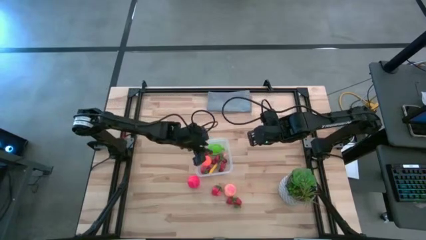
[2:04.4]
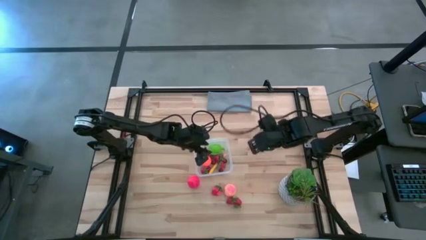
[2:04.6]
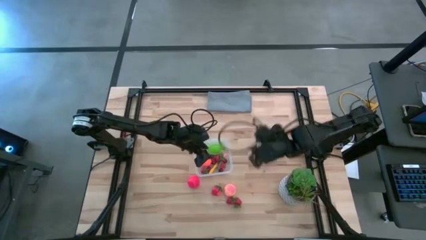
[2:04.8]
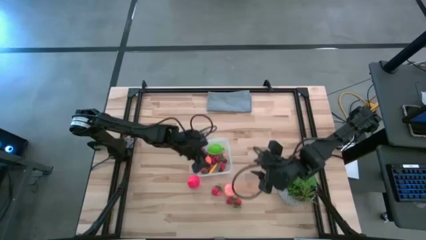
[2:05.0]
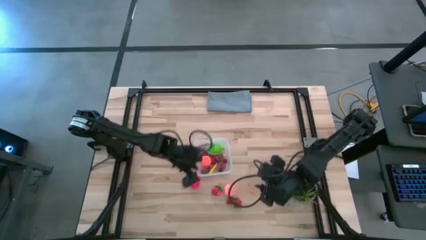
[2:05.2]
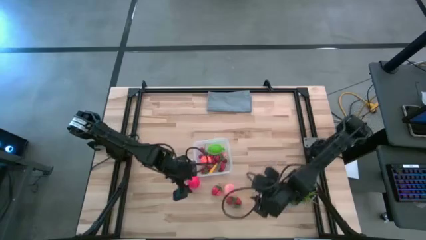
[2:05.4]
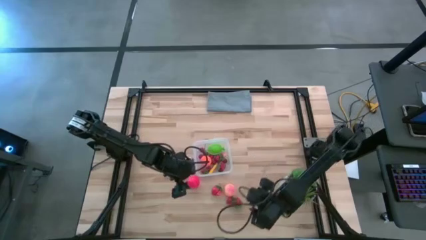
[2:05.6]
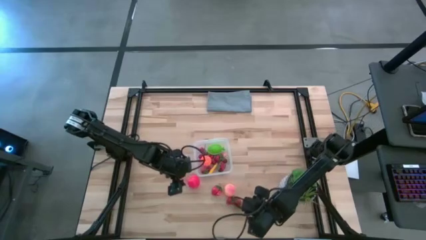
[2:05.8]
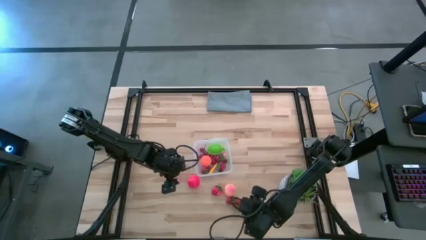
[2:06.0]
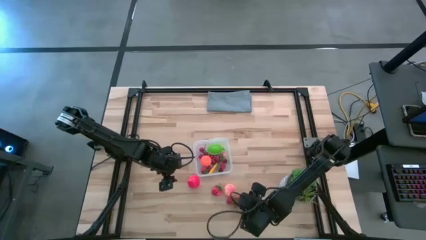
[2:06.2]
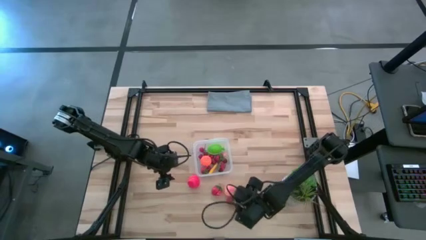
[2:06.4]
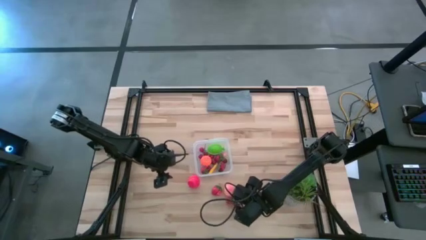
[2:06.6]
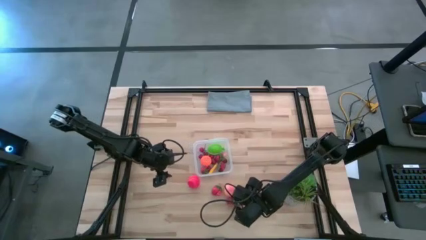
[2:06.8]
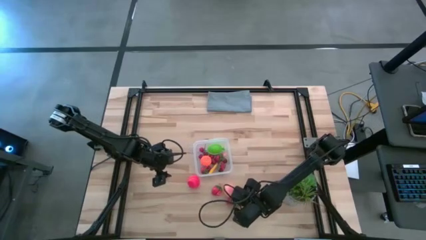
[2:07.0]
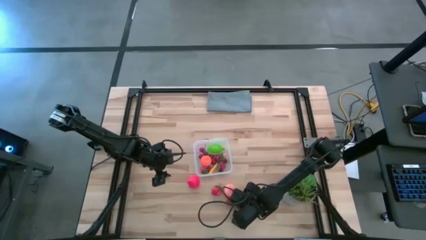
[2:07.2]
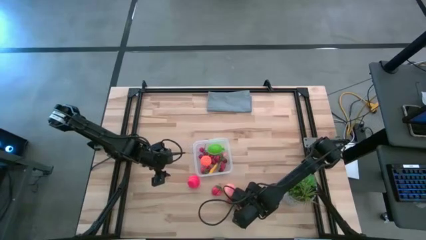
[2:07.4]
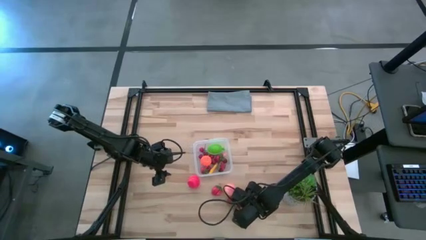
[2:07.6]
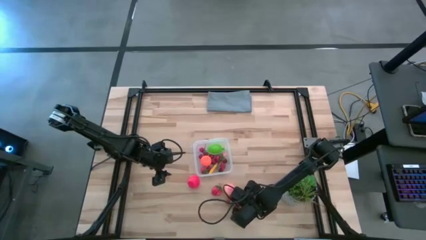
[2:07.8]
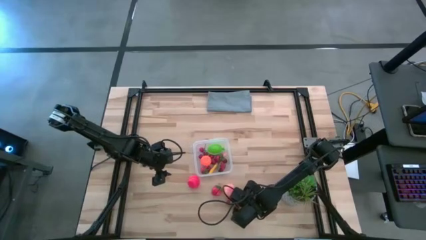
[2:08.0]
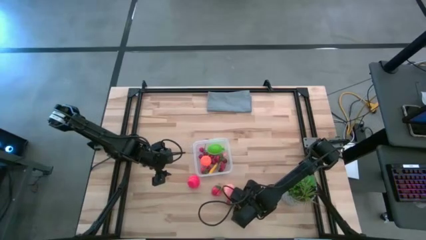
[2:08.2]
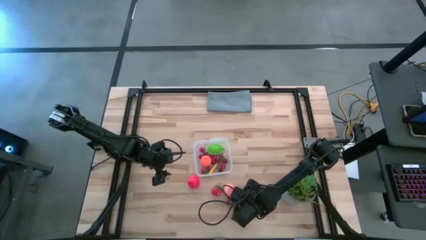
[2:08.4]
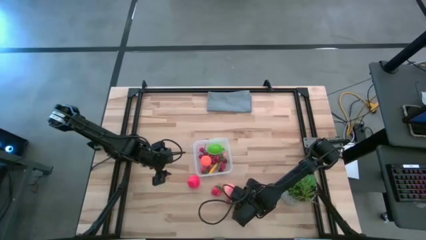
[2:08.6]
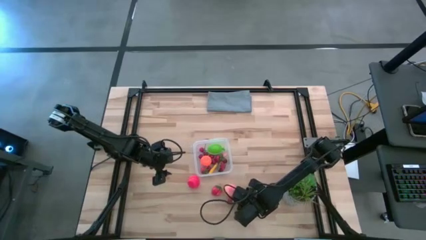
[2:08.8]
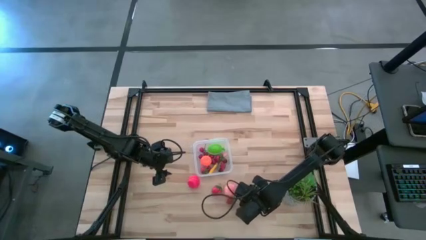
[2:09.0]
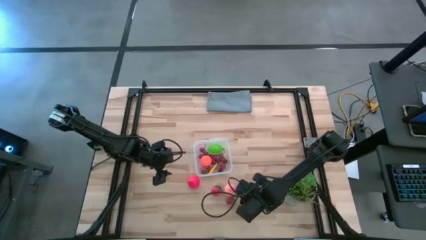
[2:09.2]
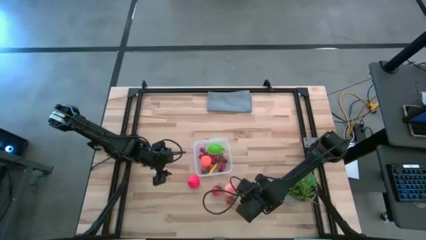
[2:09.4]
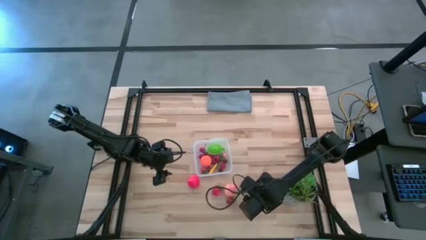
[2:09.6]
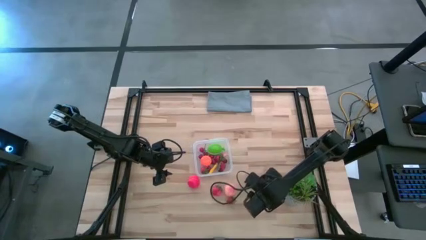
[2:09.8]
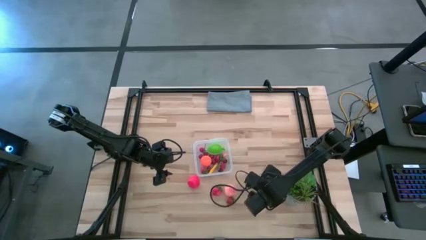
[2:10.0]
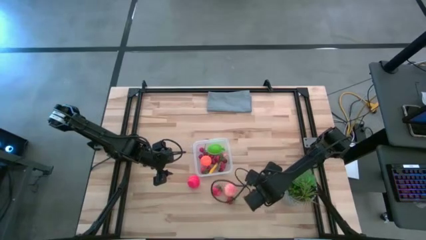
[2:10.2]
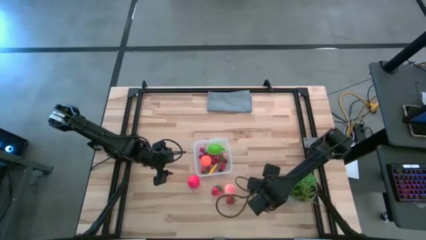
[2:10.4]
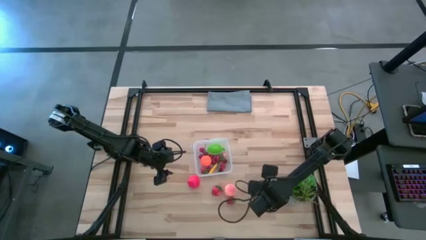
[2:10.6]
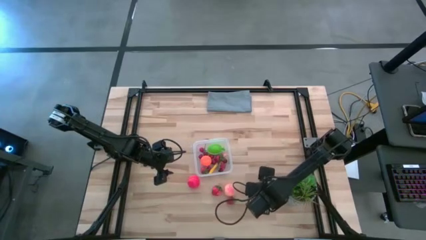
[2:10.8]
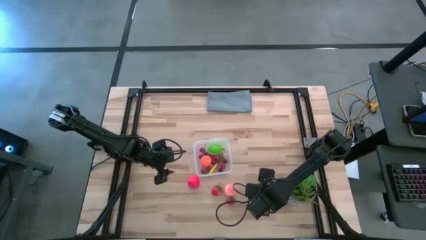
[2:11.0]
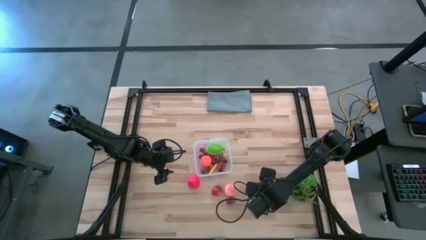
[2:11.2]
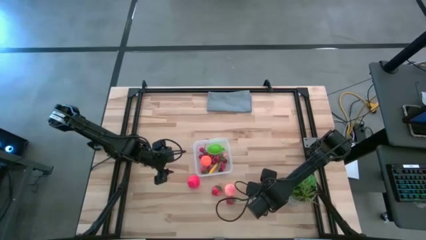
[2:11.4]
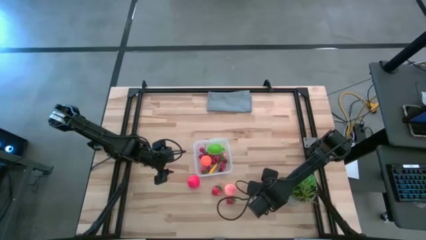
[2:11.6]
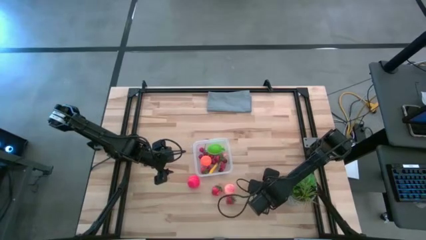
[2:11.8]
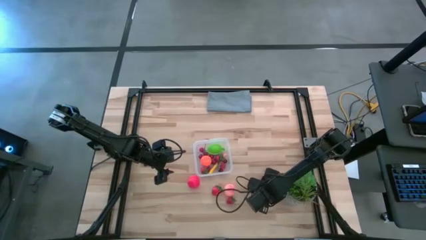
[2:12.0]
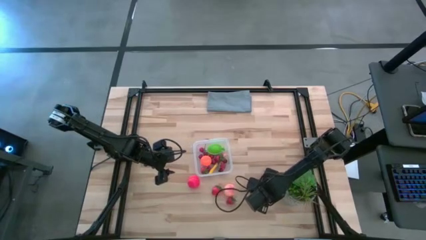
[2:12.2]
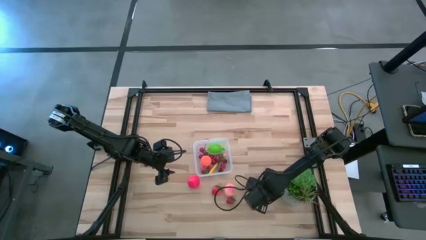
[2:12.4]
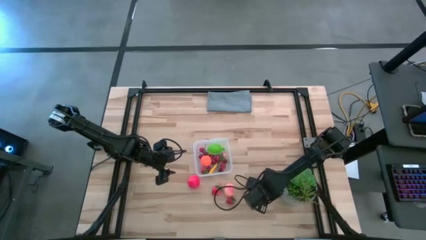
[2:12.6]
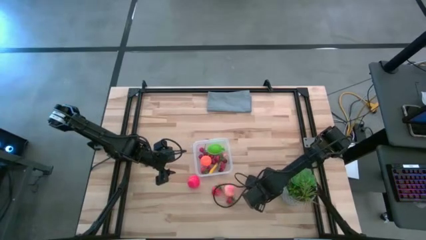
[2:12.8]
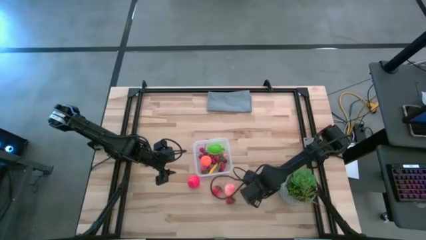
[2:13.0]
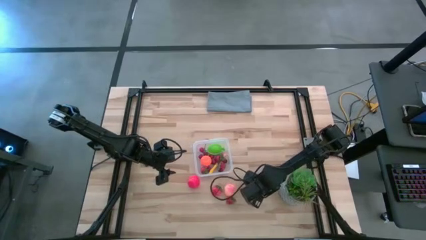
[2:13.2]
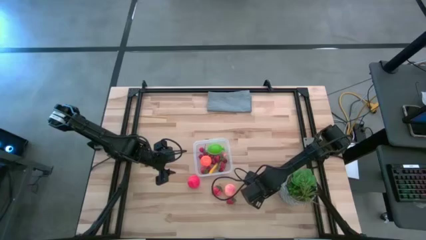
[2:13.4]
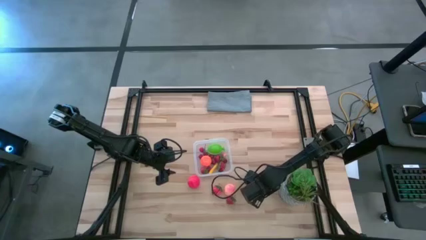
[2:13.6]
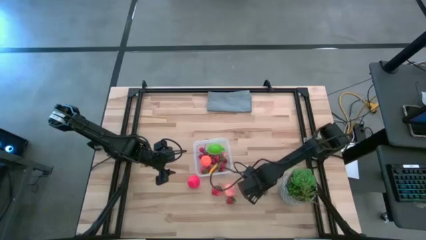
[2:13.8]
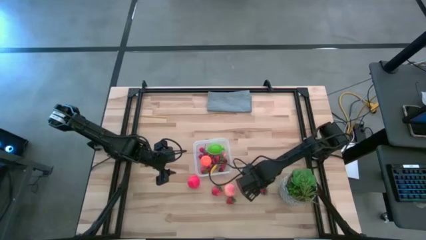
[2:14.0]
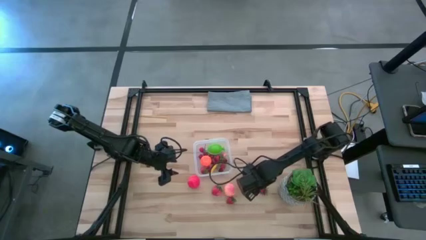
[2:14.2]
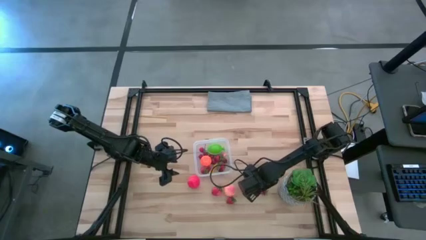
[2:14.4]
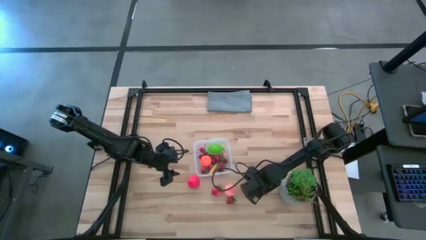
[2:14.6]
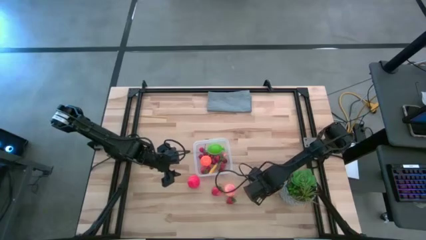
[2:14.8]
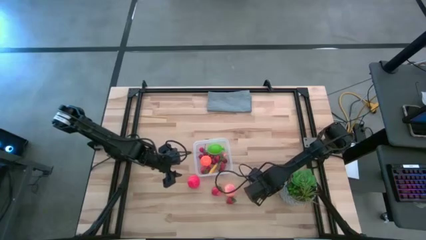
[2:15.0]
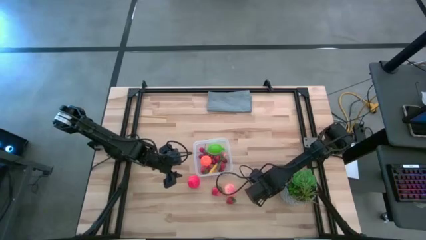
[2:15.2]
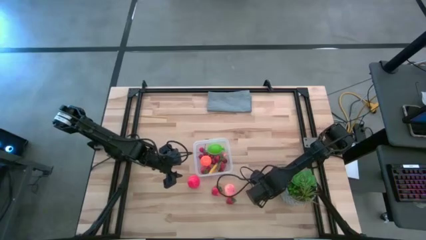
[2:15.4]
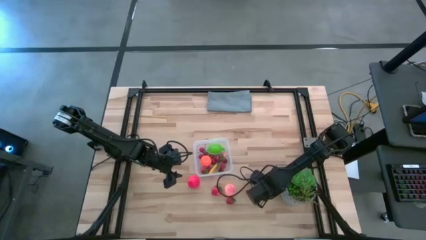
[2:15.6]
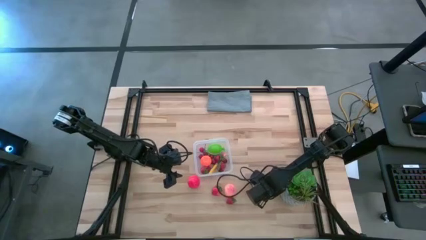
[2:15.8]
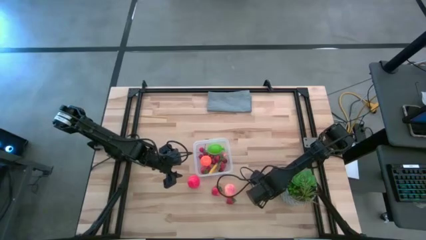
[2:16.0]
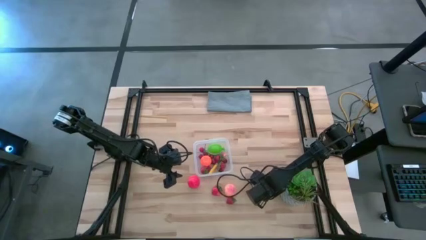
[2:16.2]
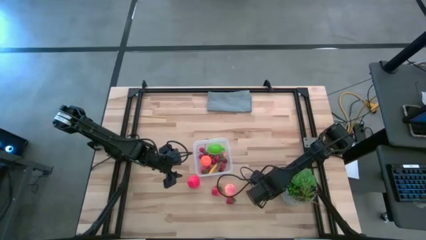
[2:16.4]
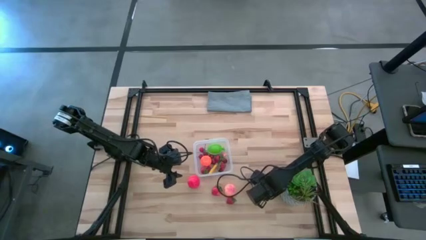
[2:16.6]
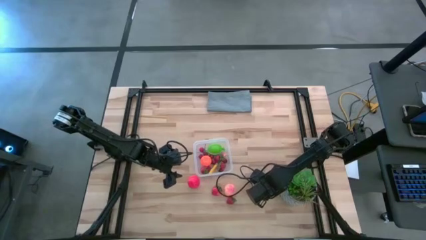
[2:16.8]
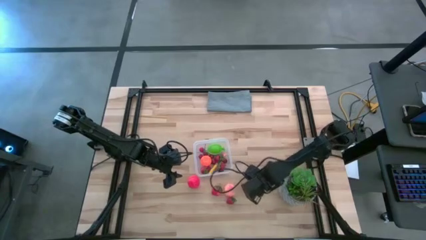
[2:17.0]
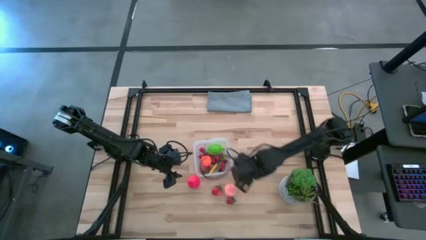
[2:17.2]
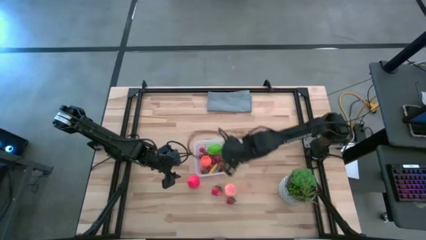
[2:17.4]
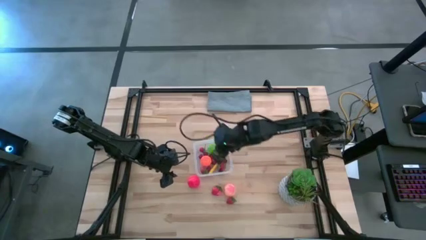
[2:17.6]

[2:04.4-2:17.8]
Task: Pick and placing Produce into tupperware
Put the red strawberry into the transparent container

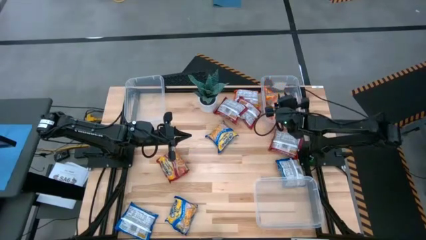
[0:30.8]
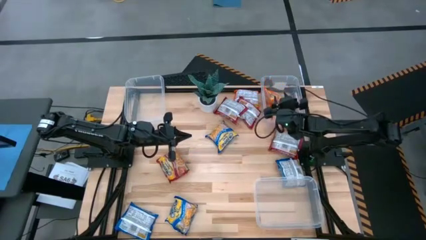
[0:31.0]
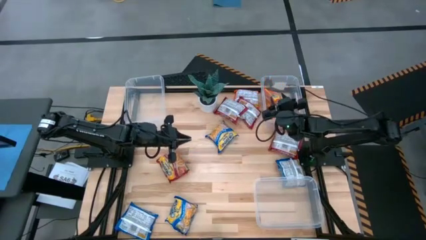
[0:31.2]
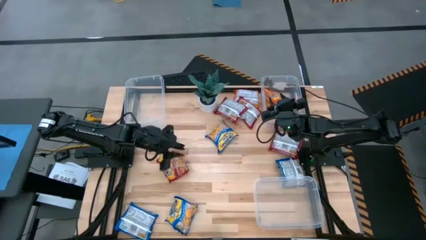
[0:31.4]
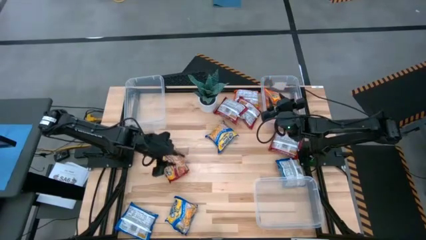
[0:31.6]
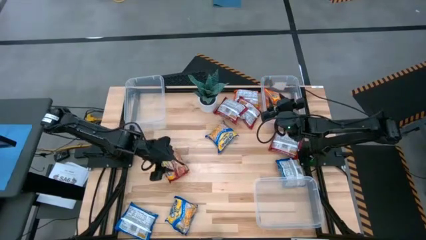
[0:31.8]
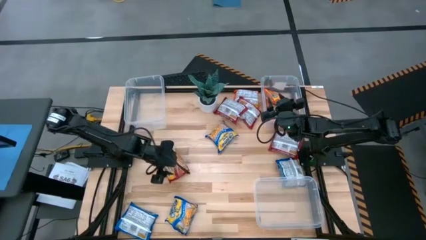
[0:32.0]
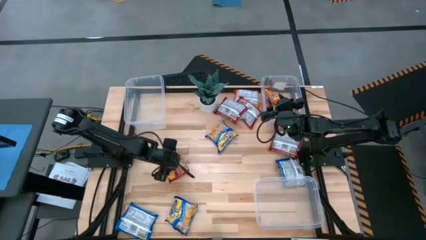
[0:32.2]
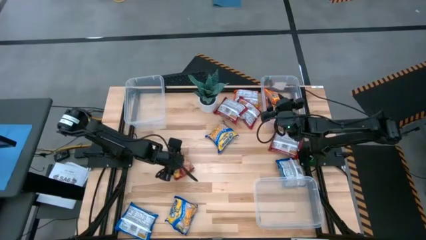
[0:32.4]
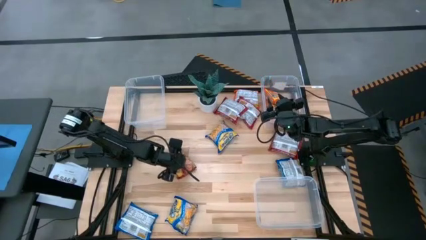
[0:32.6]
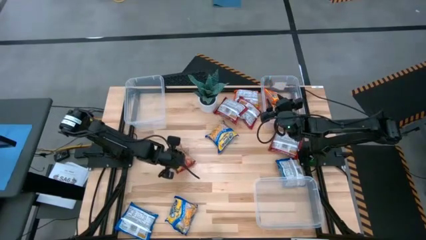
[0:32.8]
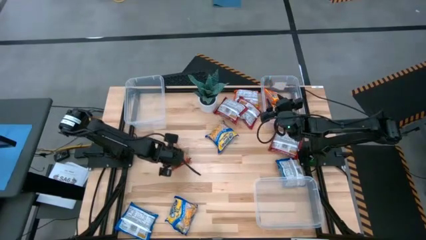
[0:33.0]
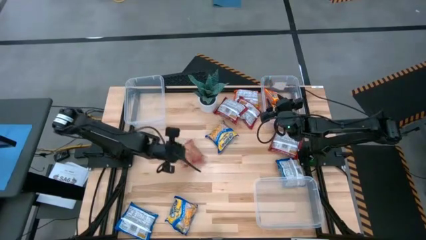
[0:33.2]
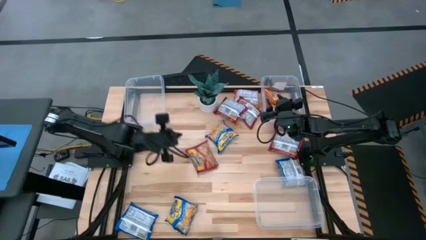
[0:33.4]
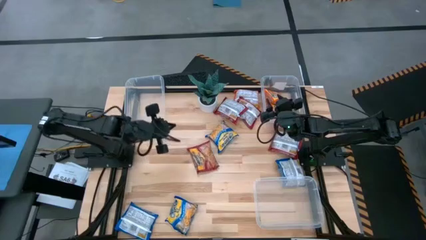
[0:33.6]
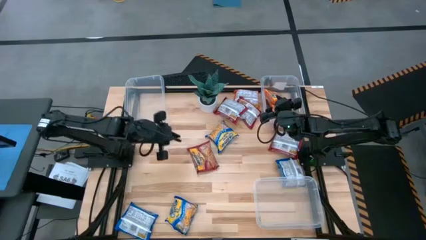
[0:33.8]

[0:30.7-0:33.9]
Task: Sort Maruchan noodles
Put the red noodle pack in the top left transparent bin
